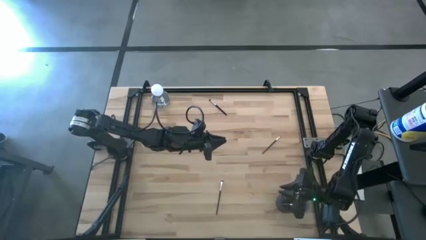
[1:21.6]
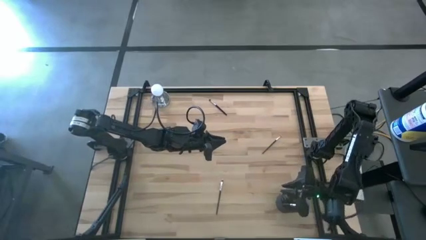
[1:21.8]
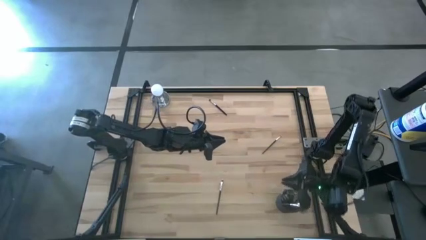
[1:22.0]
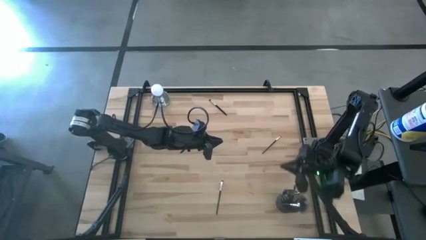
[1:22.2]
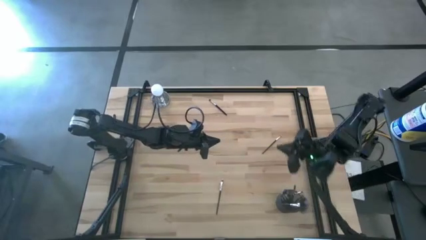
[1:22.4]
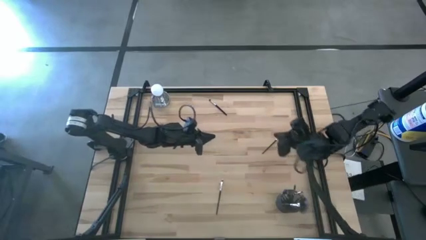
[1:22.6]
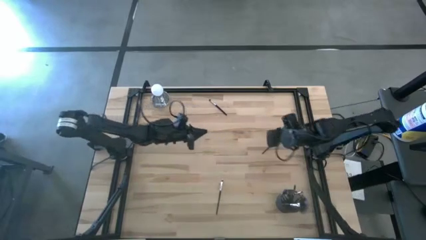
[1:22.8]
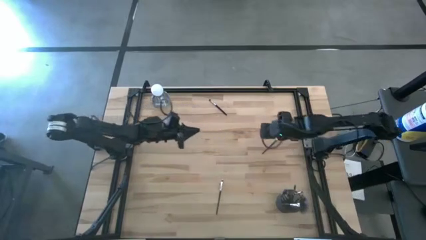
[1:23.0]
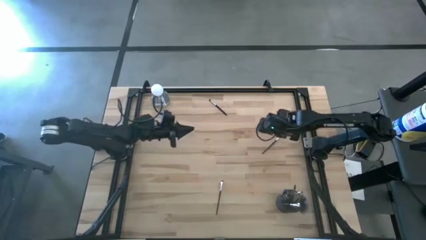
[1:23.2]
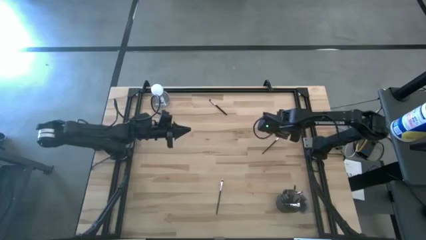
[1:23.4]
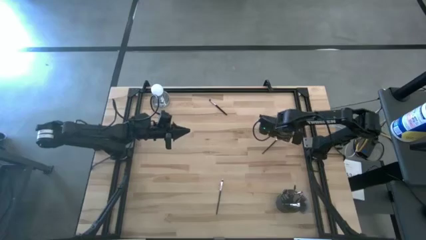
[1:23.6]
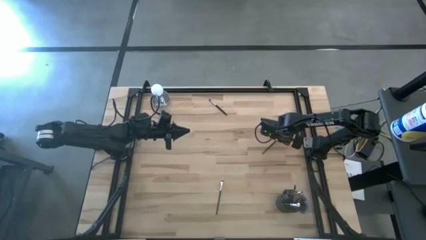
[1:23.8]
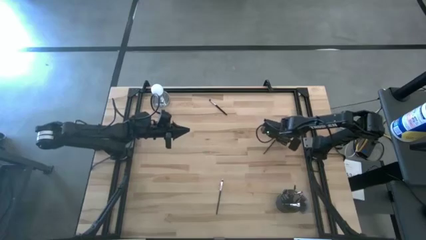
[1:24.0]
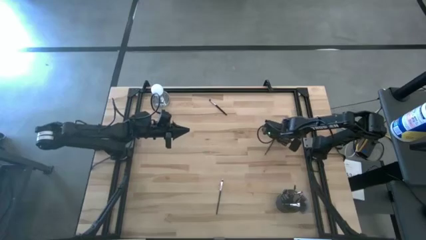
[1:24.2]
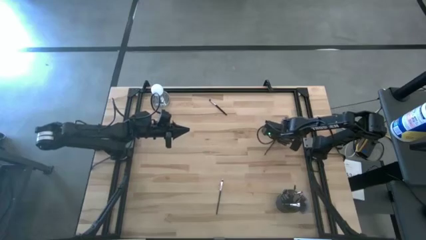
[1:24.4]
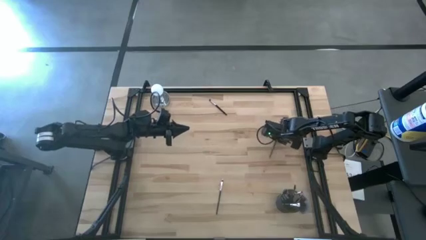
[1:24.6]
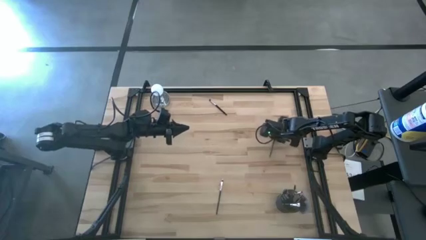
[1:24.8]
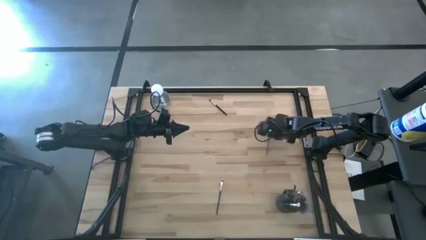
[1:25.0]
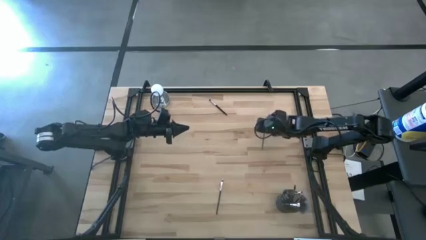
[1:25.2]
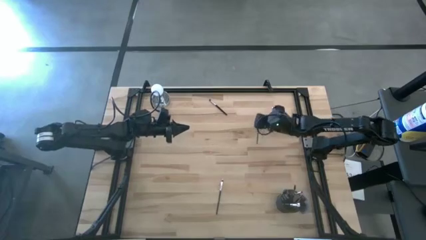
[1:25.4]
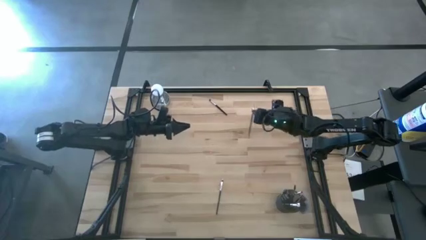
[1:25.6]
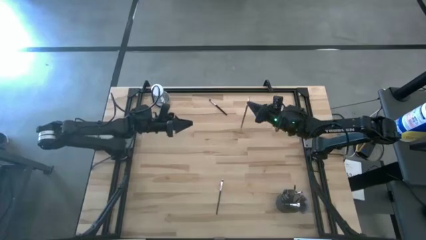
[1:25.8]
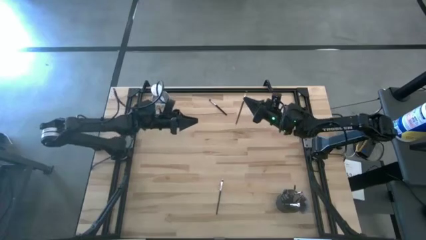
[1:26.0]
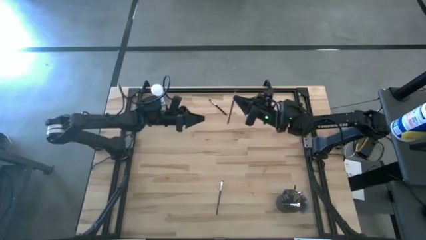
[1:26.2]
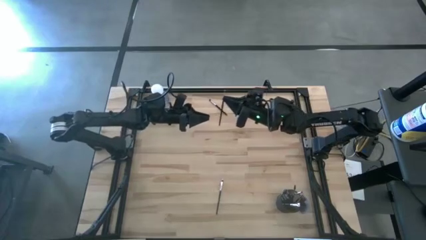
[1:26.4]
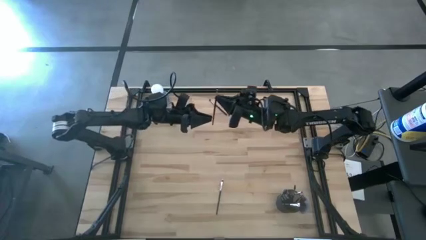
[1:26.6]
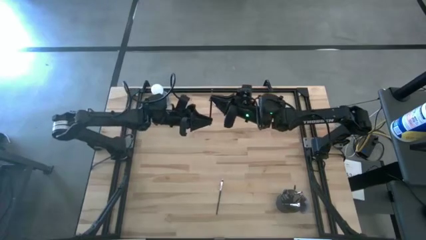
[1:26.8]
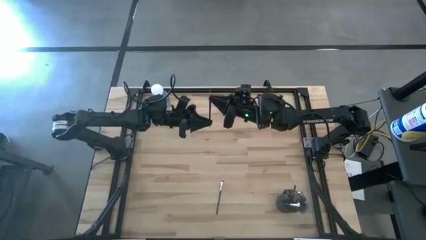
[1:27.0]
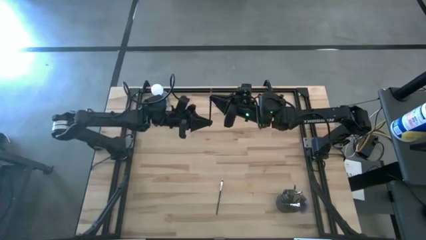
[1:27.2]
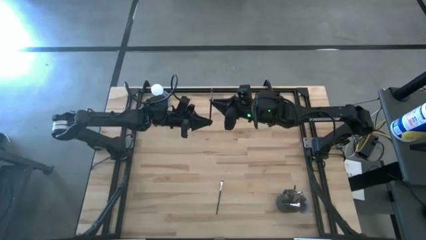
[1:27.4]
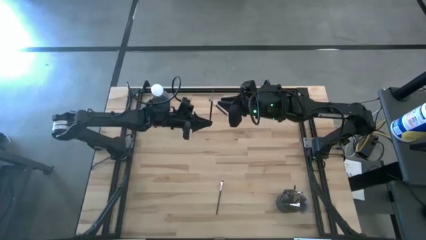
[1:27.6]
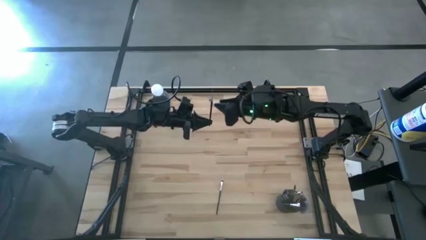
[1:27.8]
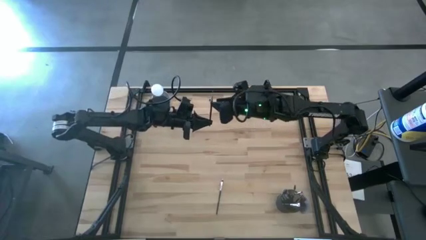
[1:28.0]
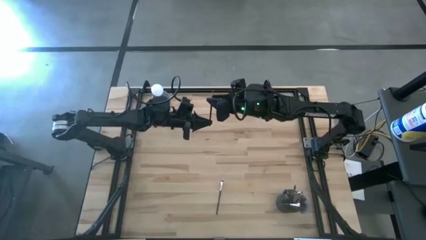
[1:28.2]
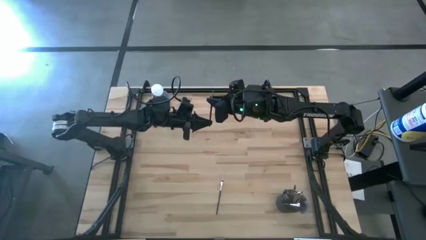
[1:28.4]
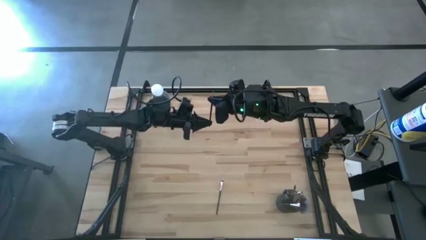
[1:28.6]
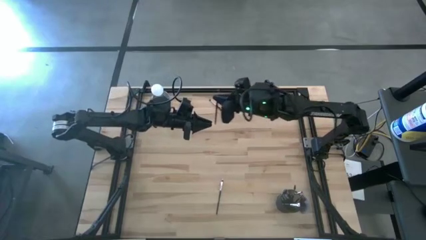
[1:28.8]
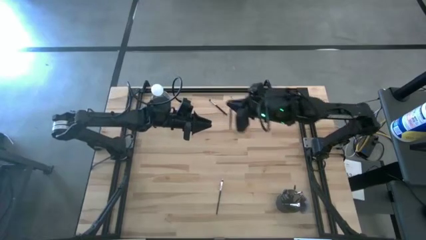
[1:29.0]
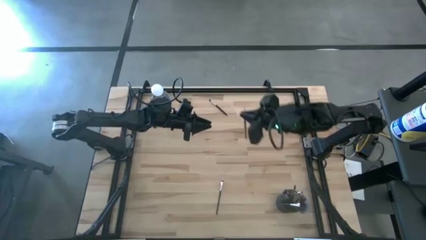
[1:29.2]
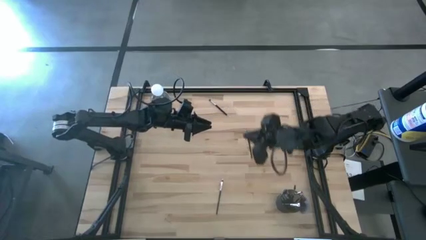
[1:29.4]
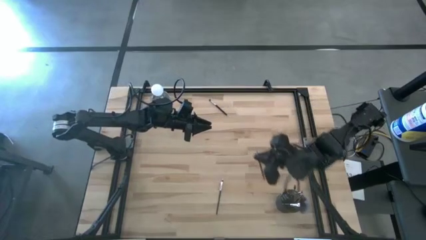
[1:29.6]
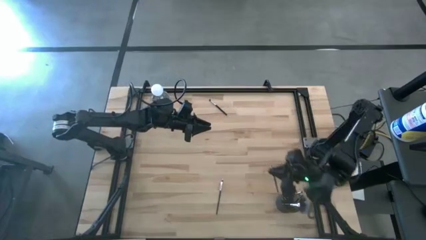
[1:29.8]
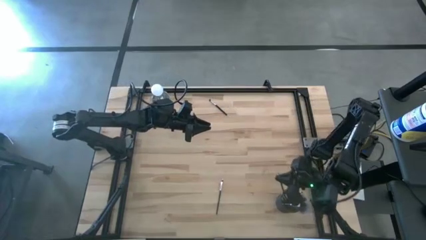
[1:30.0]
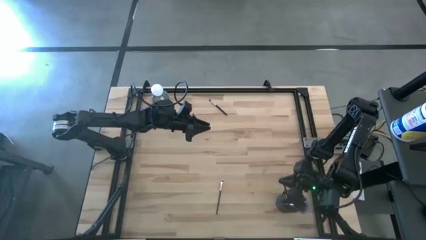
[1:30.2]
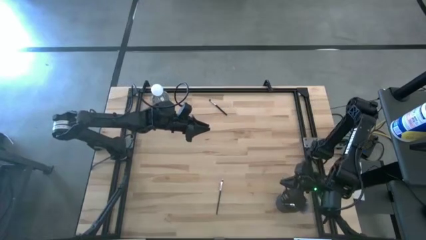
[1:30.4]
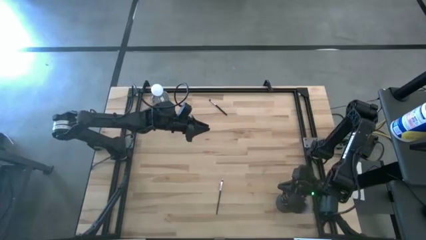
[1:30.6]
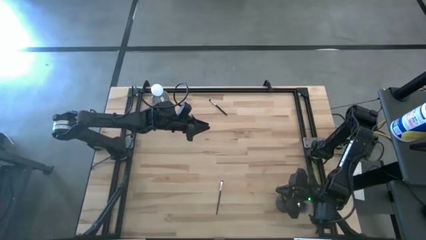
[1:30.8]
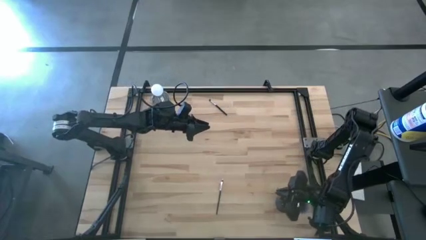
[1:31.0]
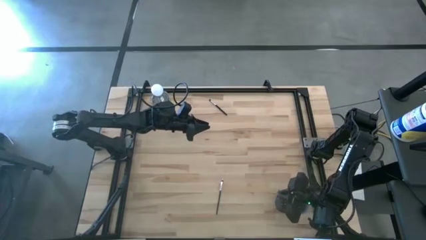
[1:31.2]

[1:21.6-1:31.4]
Task: Put items in baskets/containers
Put the eyeshadow brush into the brush holder

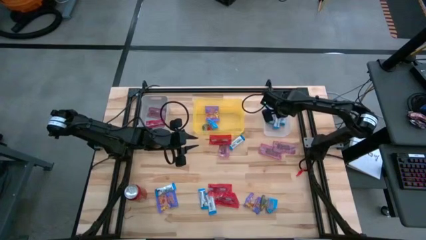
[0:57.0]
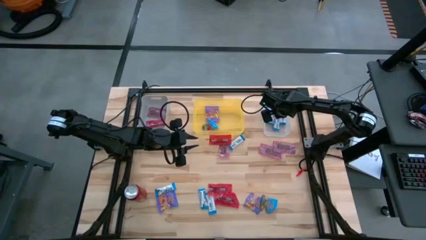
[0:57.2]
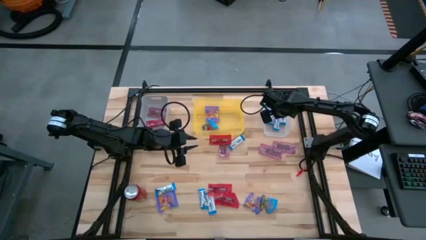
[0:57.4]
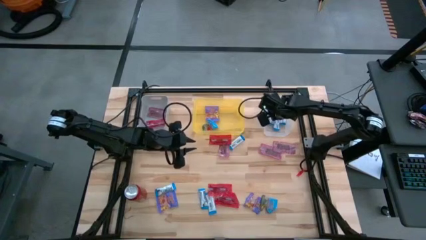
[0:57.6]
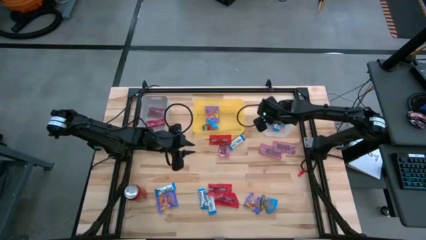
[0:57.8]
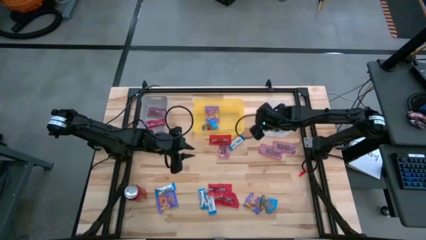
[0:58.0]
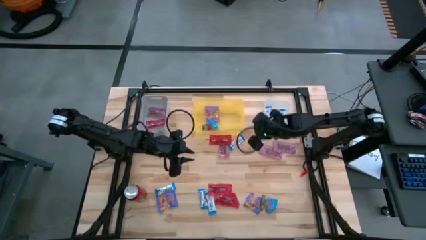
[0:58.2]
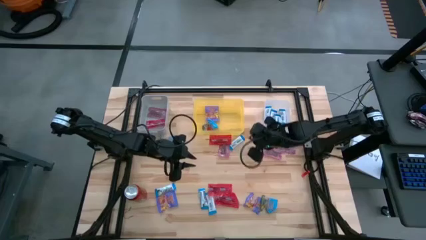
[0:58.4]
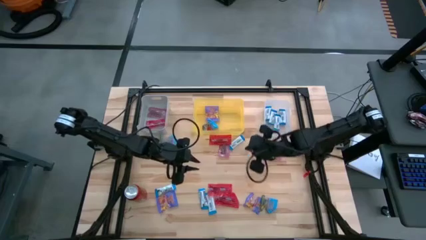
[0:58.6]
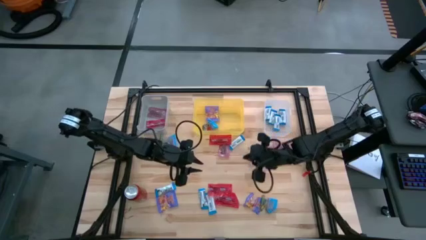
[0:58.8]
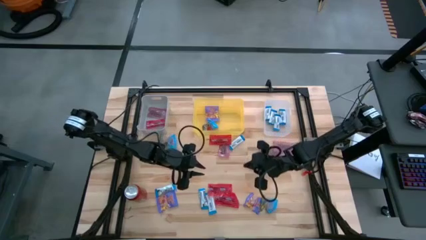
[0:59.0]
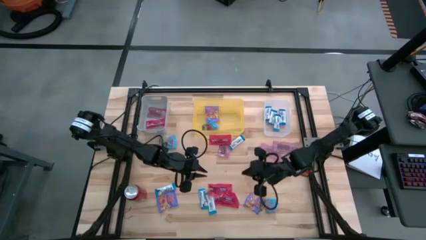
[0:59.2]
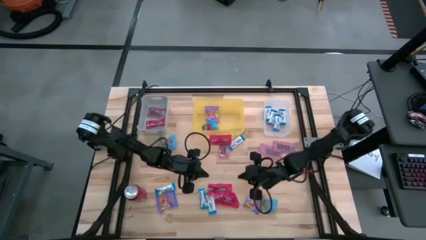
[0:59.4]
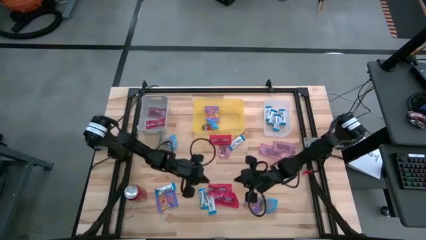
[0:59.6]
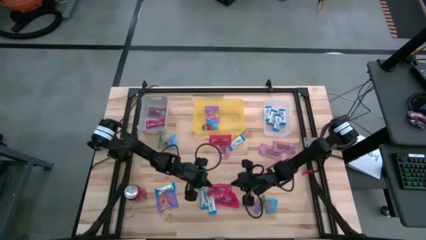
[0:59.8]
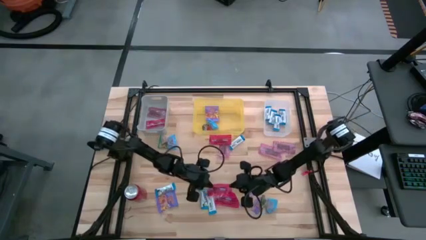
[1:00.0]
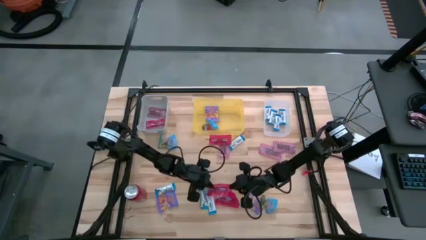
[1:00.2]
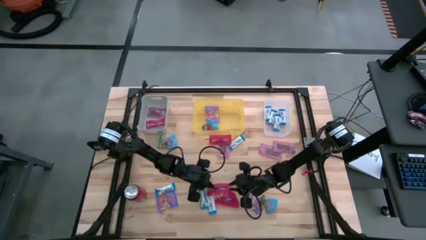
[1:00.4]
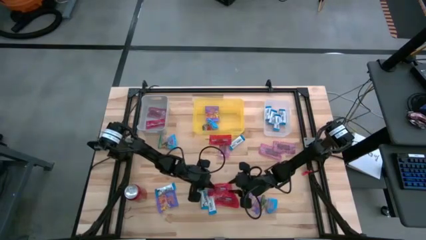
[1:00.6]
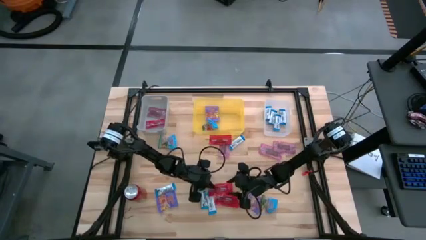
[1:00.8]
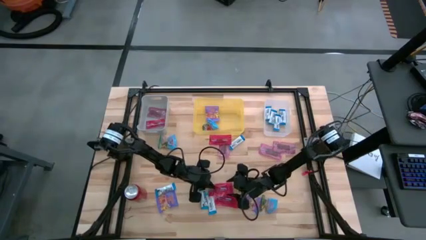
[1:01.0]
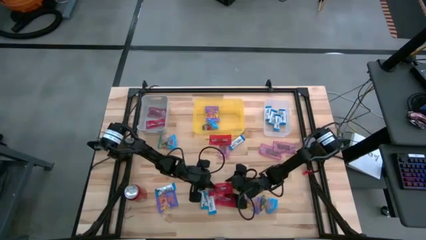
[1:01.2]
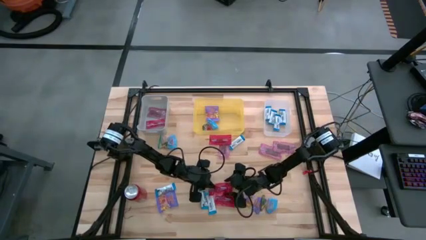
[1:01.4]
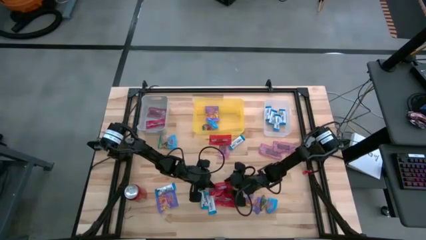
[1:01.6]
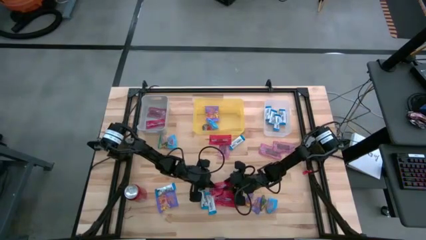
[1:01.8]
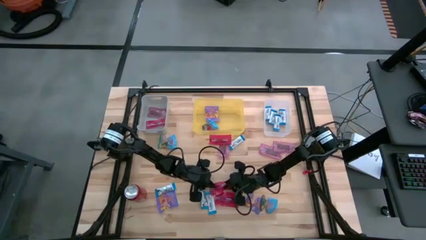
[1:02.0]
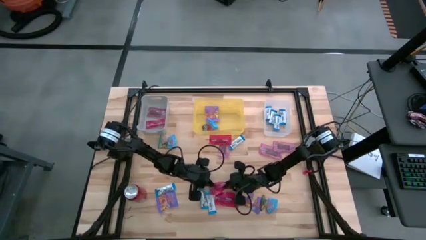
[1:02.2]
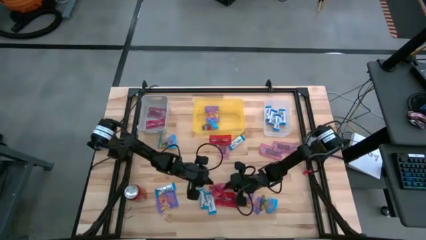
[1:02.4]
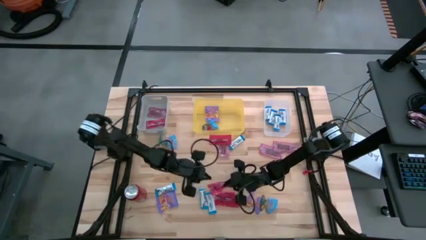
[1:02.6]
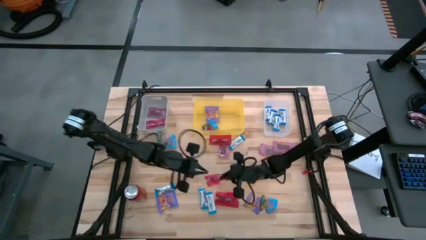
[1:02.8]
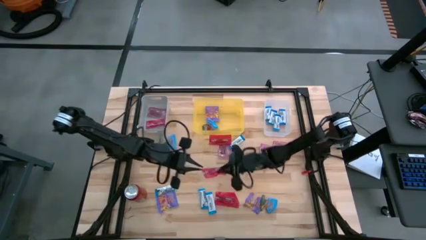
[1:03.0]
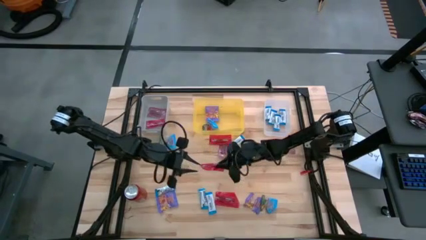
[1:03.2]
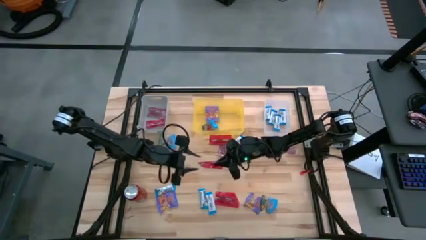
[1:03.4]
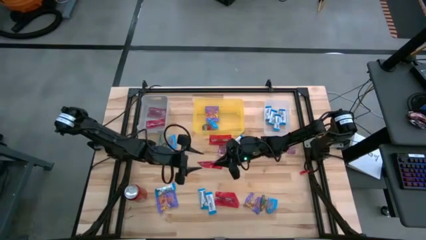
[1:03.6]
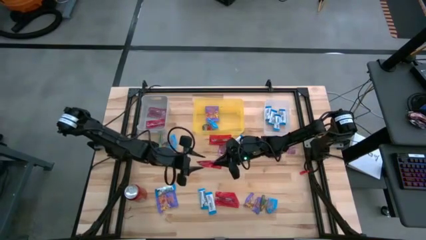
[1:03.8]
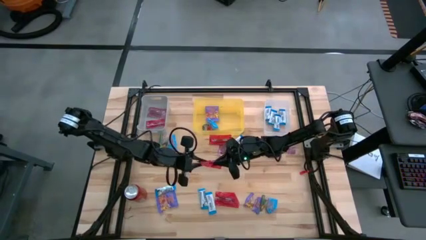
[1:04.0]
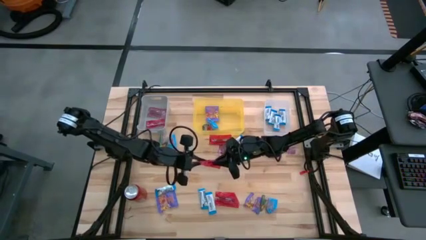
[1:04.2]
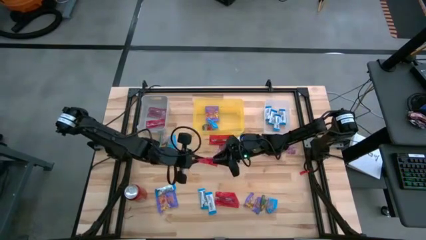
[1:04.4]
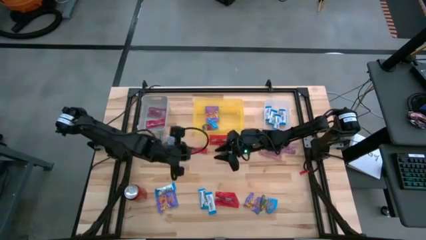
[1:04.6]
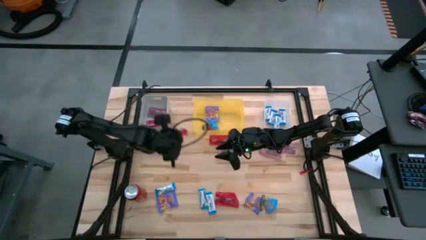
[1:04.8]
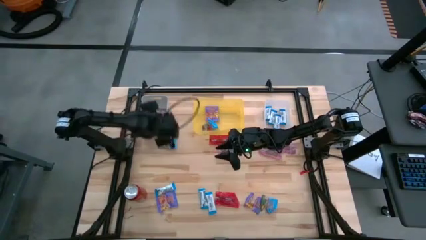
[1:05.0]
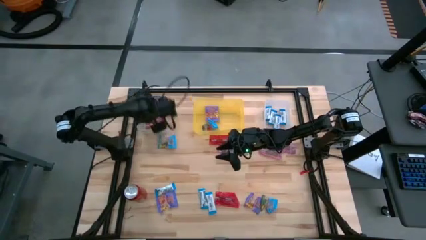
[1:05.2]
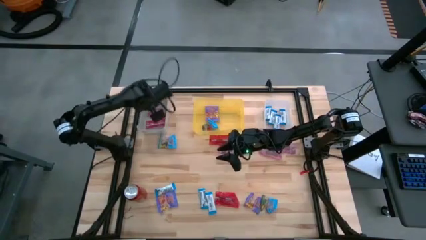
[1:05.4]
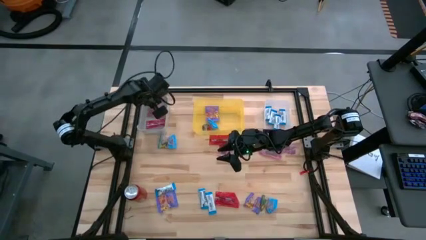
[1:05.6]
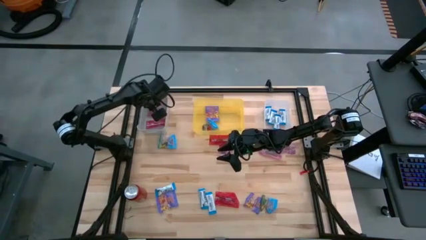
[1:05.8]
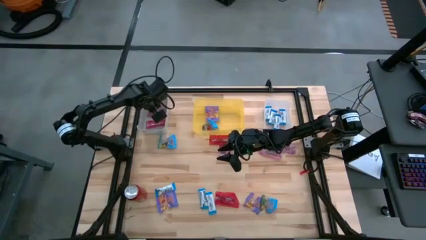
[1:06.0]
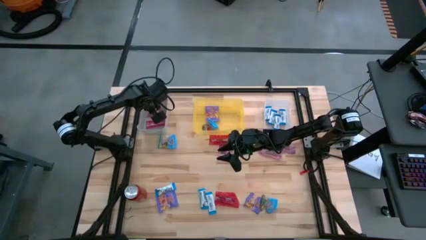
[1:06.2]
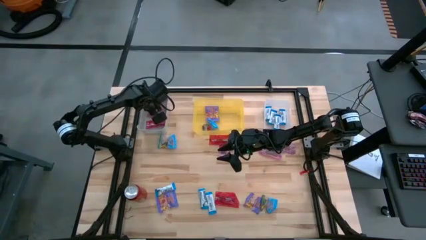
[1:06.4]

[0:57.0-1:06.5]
Task: Sort candy
Put the red gummy into the gray bin
